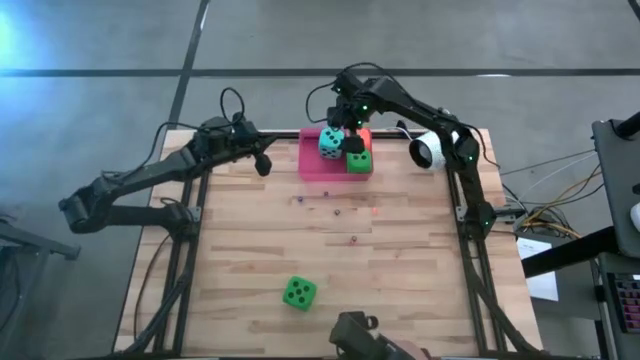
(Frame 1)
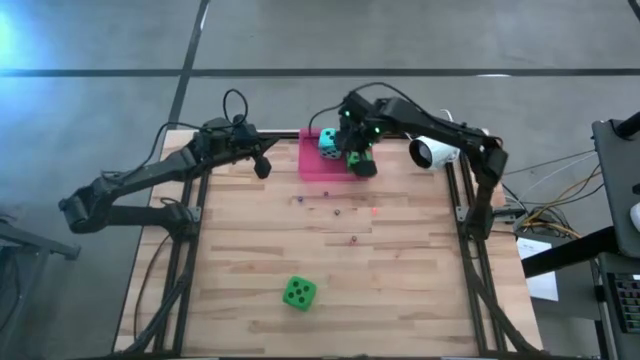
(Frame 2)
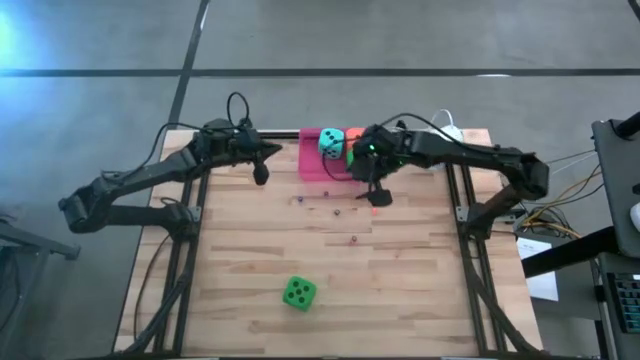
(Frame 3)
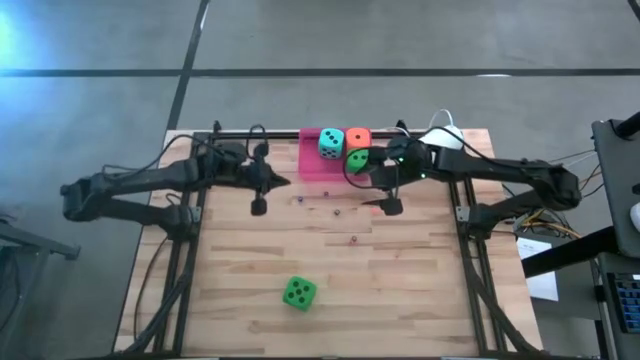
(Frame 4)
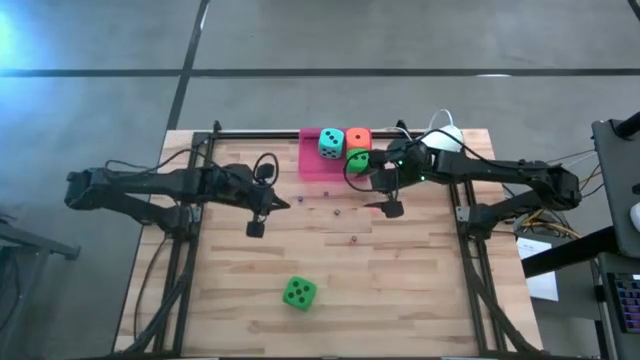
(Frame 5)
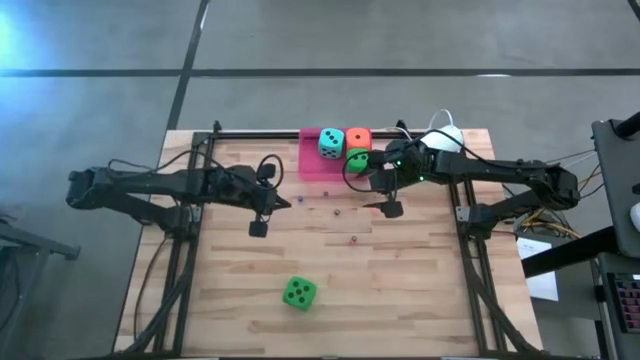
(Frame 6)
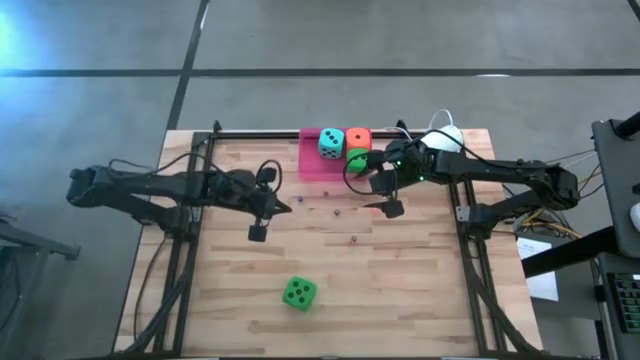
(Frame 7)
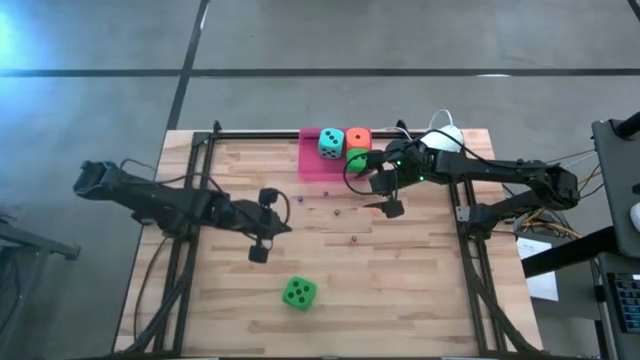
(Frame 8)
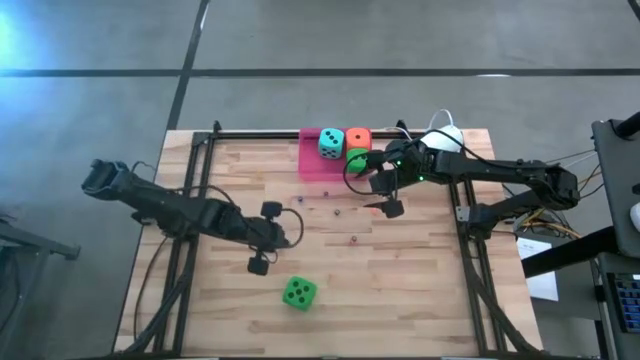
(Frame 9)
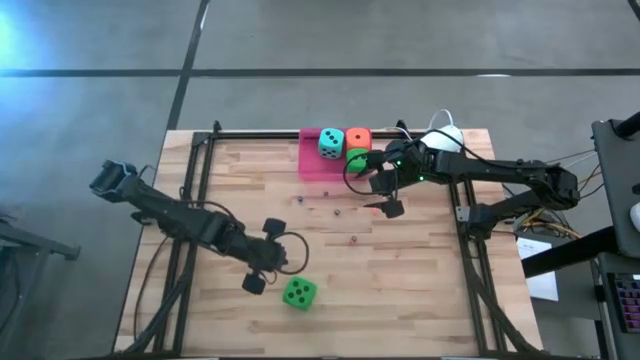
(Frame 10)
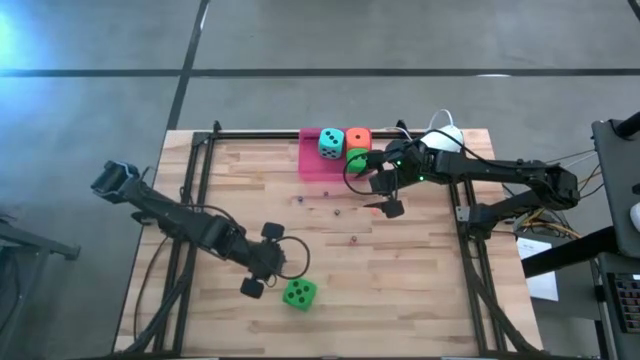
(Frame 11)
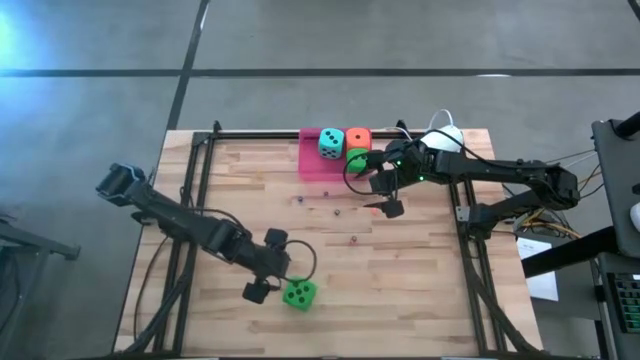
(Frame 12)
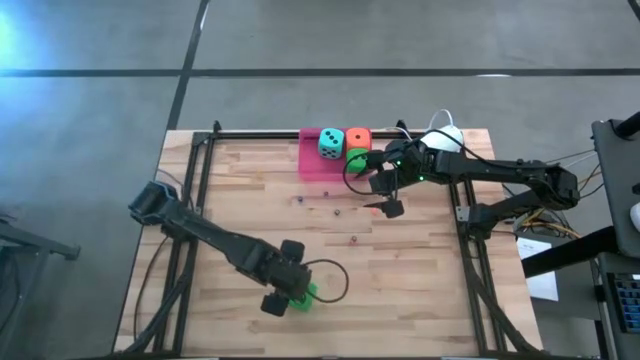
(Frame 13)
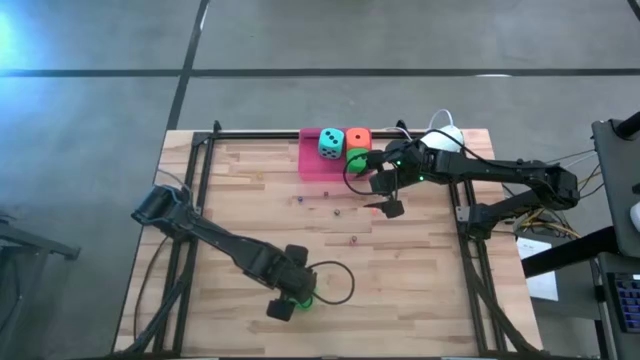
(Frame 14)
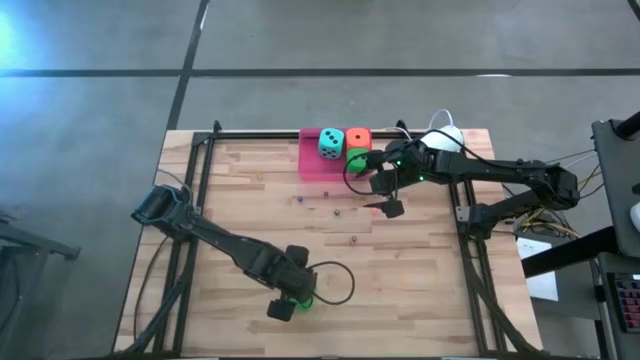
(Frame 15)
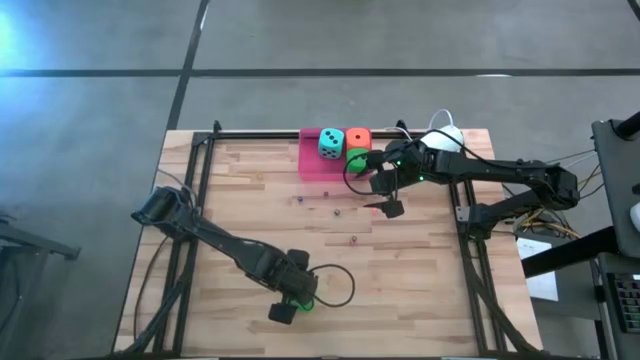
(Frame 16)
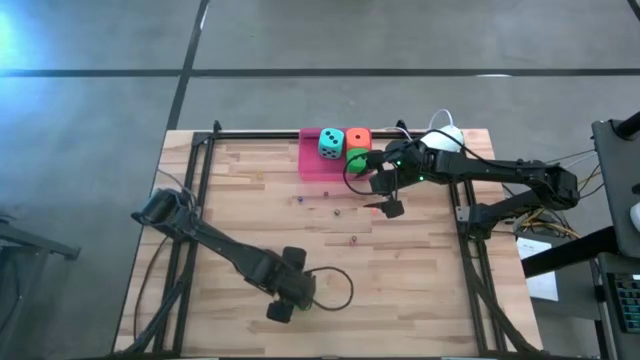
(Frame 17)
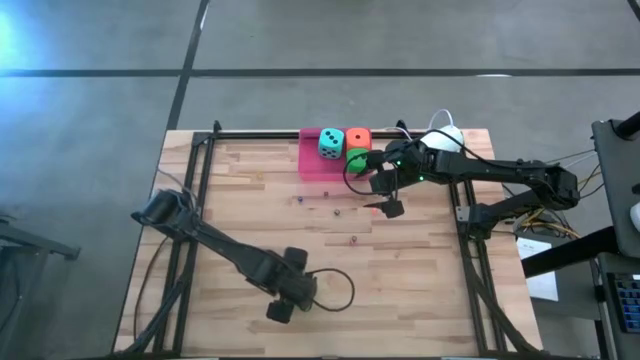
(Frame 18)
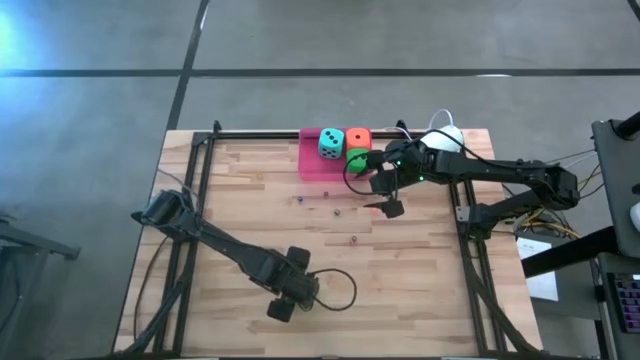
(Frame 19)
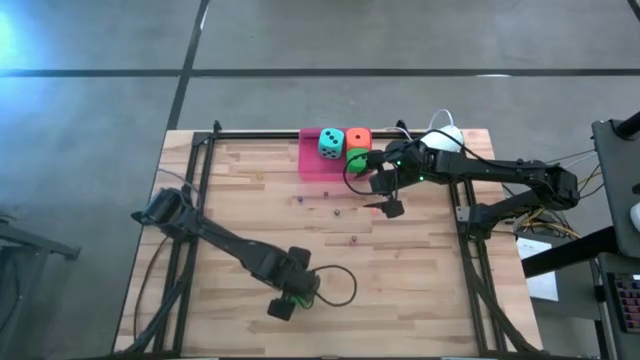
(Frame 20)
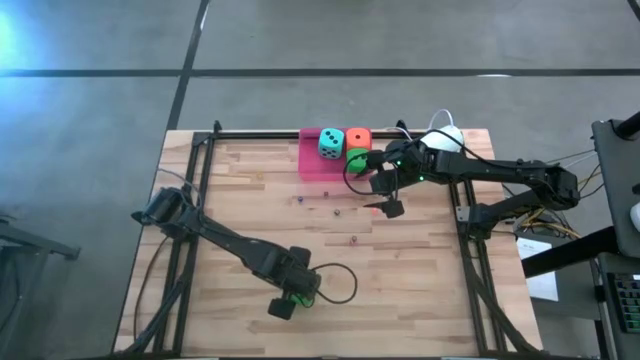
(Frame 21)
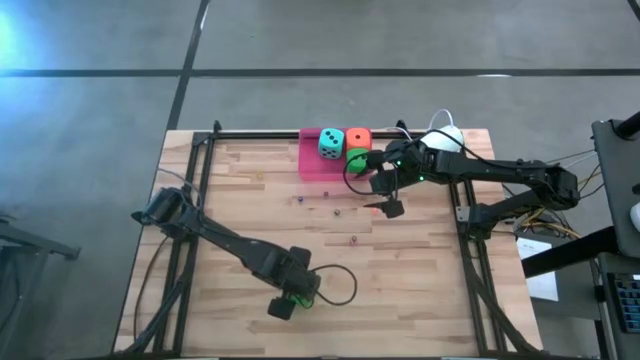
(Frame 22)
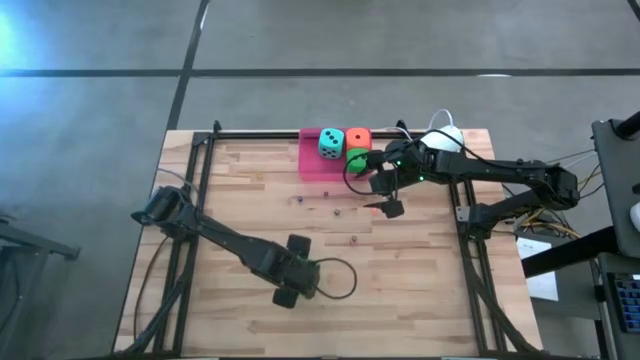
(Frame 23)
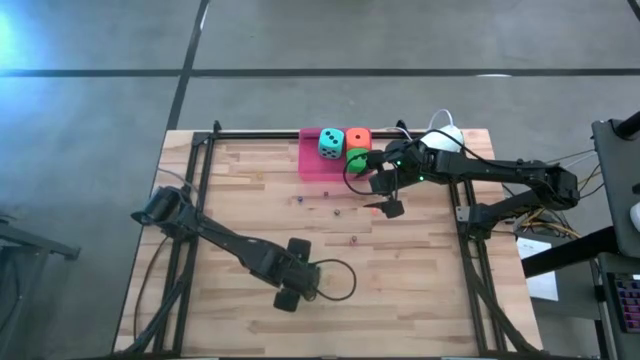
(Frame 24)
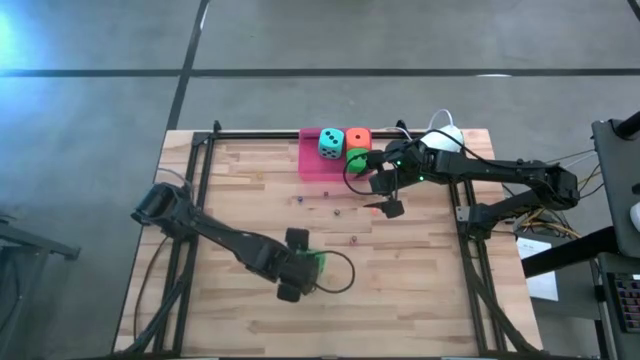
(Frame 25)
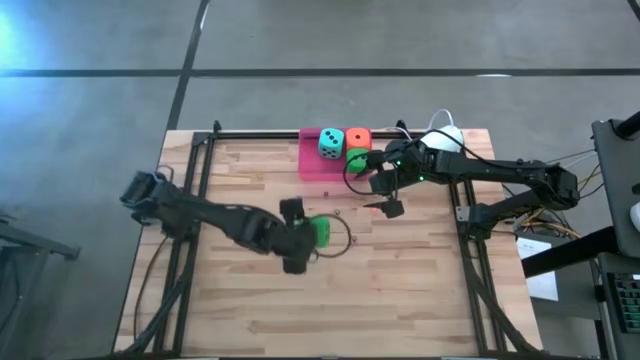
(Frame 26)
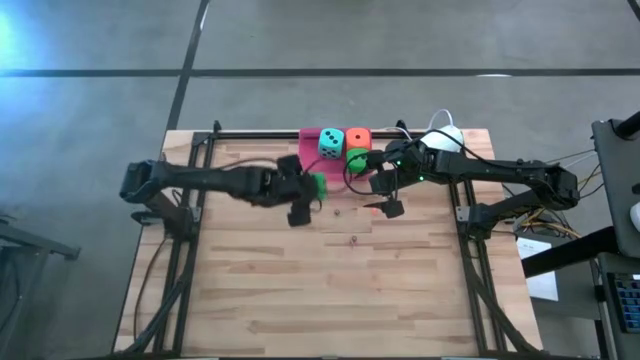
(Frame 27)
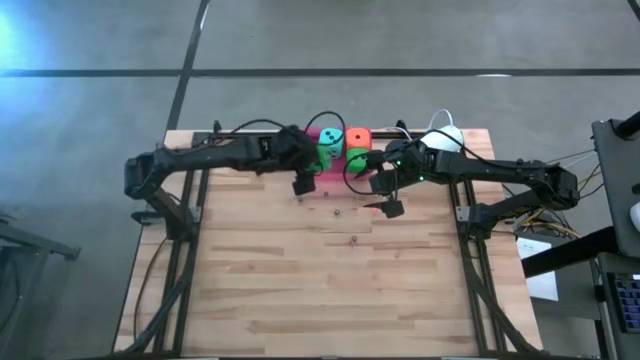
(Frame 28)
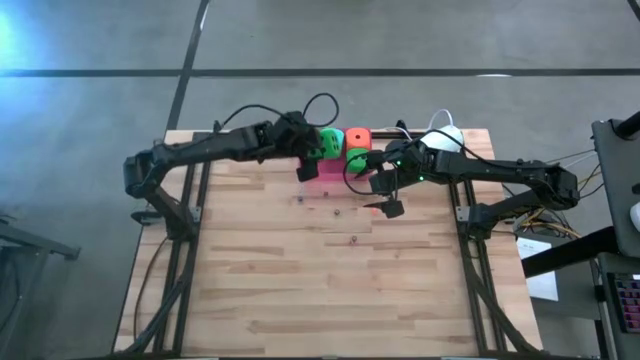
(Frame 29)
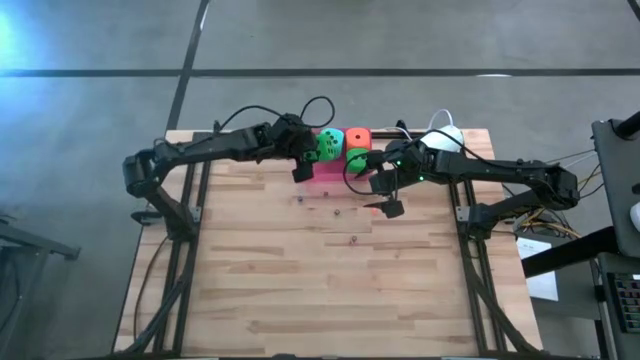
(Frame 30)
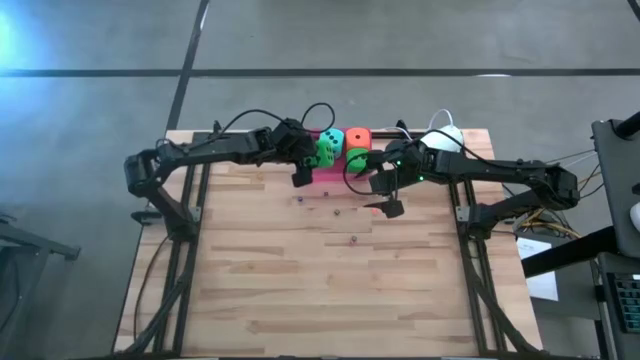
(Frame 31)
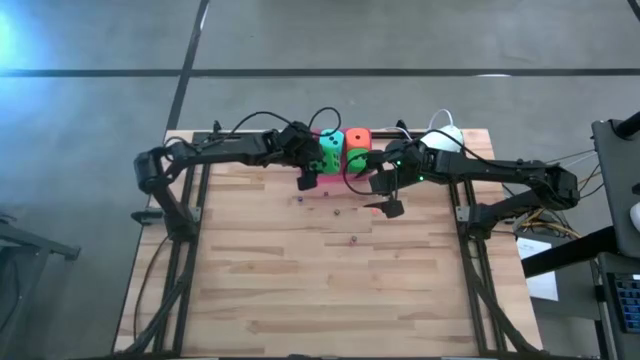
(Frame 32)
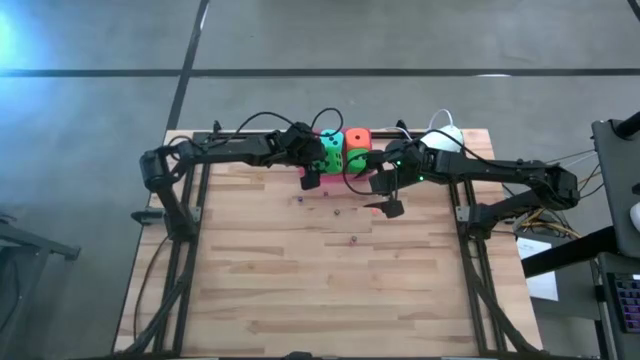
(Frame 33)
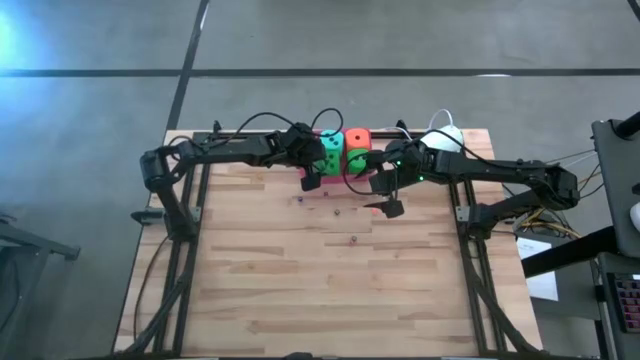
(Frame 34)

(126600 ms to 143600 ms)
Task: Pick & Place Dice
Put the large green dice into the the pink bin

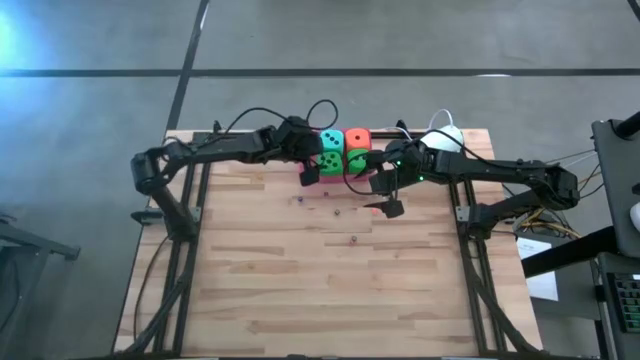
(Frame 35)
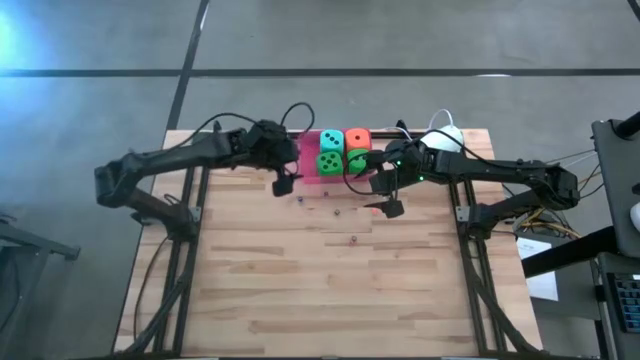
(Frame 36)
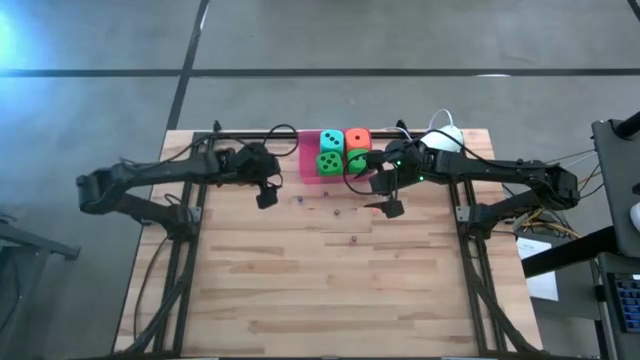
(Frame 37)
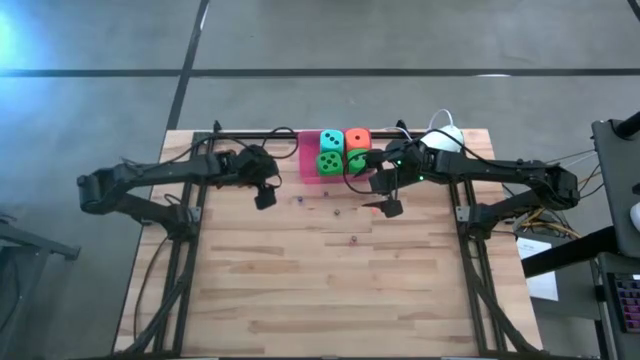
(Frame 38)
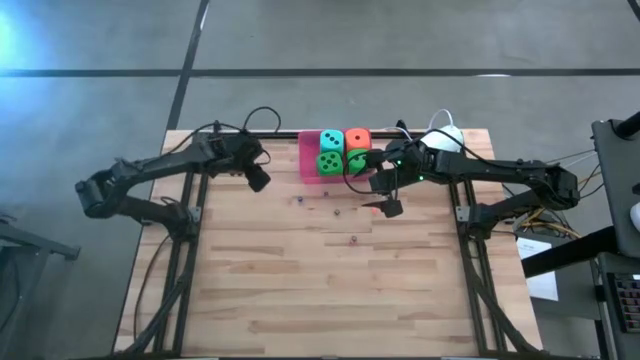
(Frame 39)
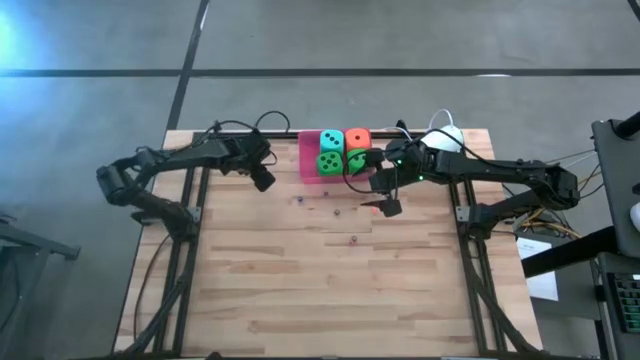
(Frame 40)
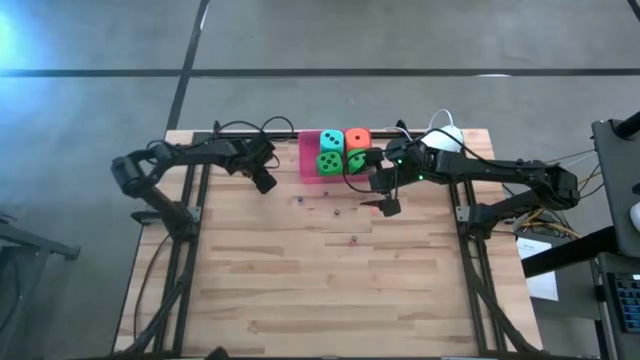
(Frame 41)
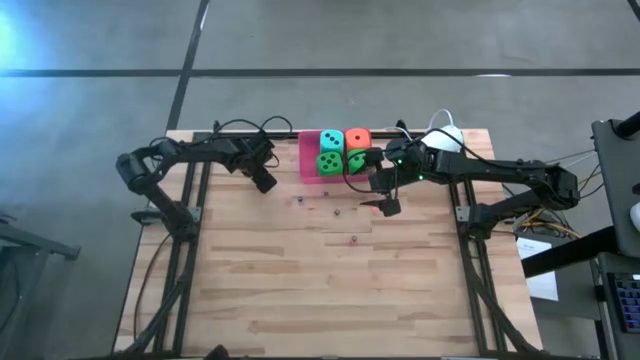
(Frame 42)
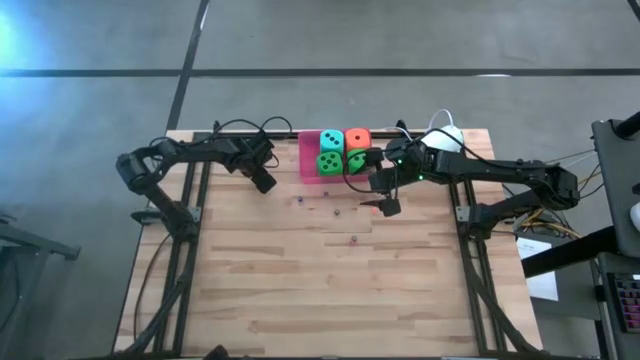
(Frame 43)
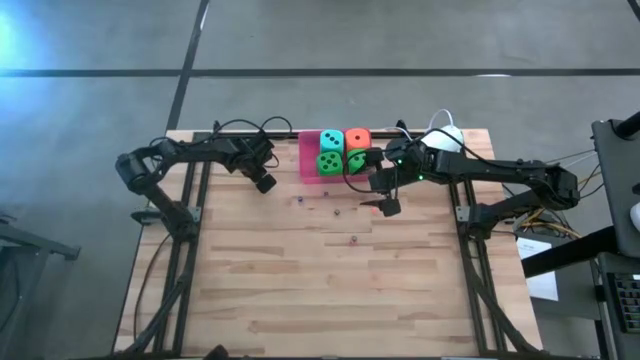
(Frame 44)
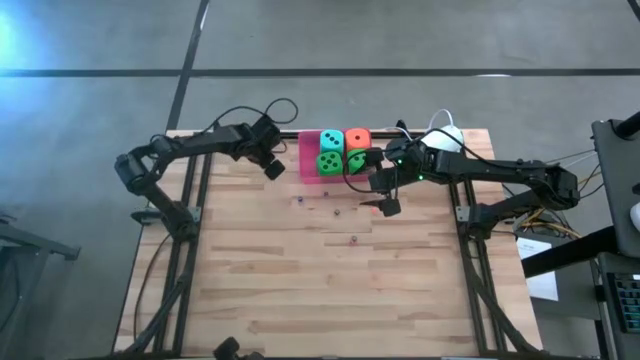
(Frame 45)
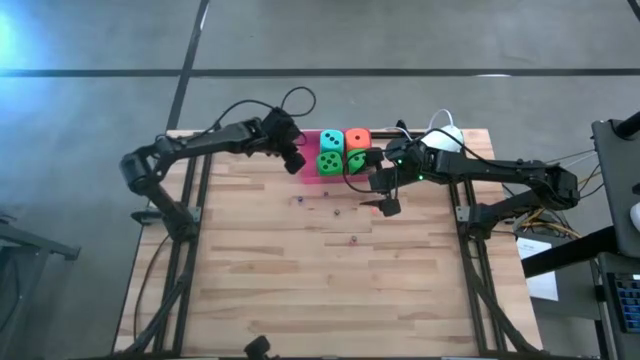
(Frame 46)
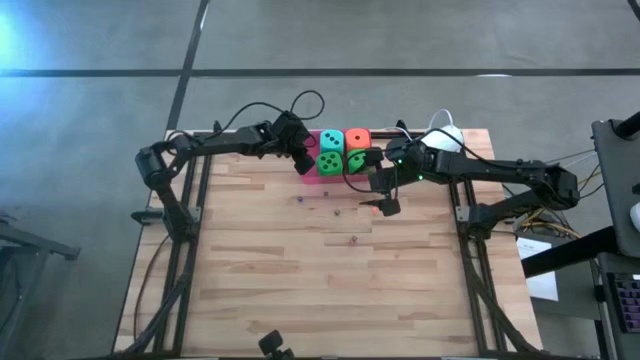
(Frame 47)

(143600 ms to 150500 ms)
Put the left small orange dice into the the pink bin
